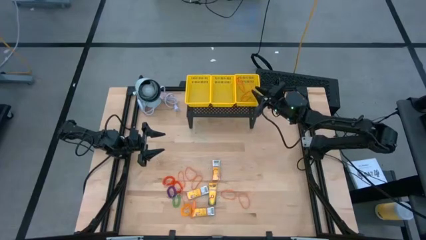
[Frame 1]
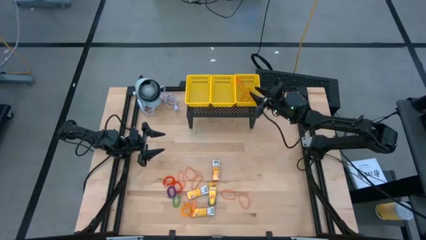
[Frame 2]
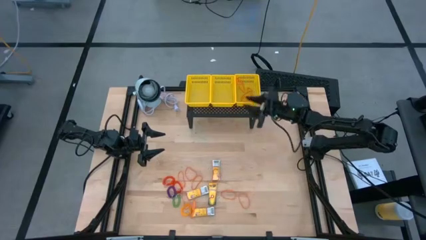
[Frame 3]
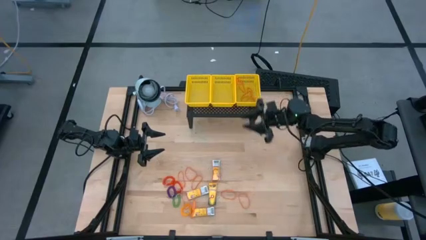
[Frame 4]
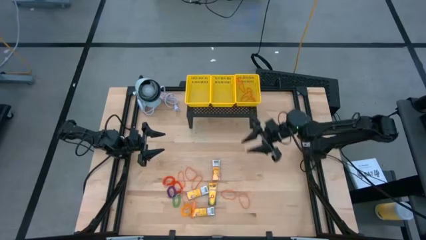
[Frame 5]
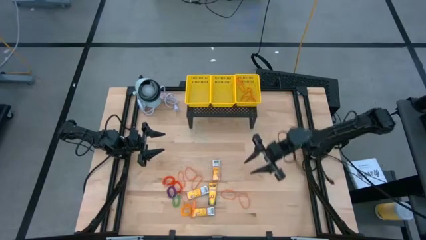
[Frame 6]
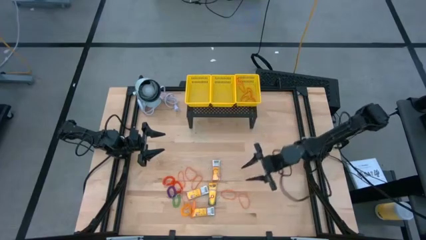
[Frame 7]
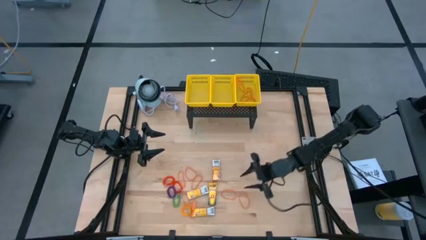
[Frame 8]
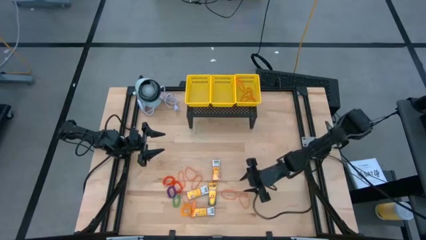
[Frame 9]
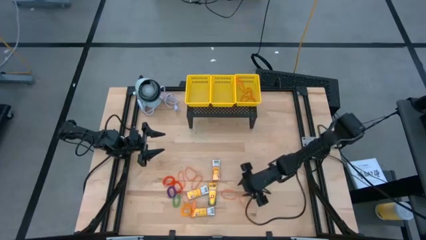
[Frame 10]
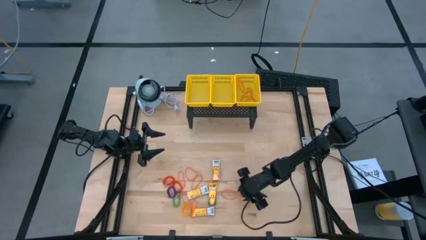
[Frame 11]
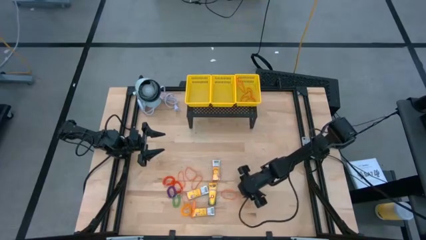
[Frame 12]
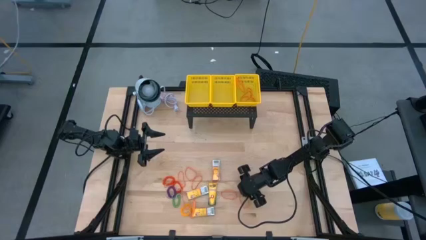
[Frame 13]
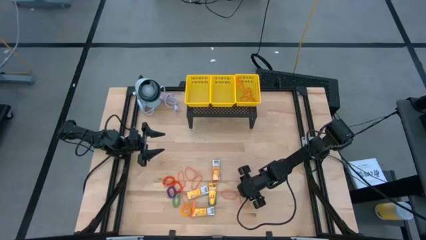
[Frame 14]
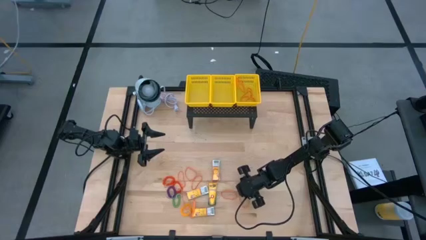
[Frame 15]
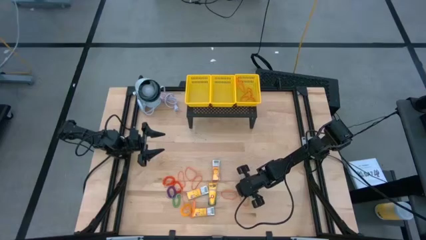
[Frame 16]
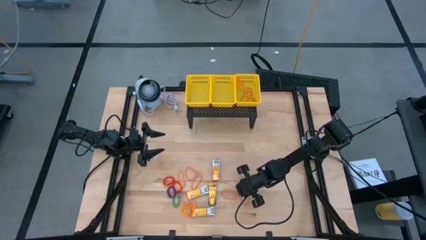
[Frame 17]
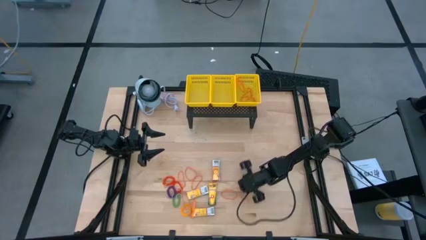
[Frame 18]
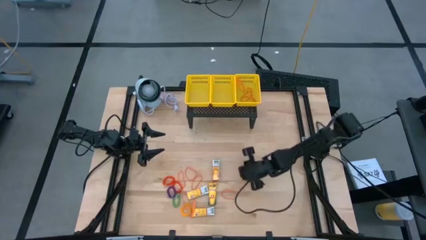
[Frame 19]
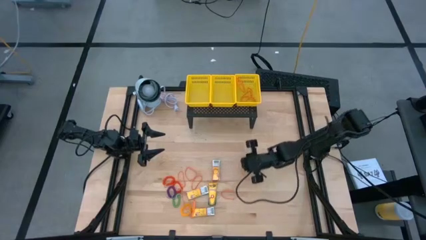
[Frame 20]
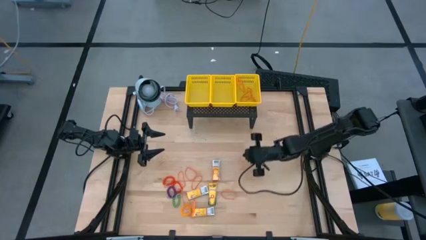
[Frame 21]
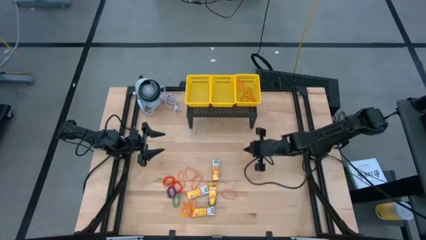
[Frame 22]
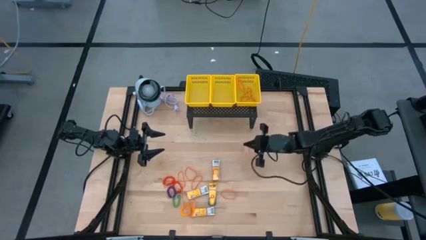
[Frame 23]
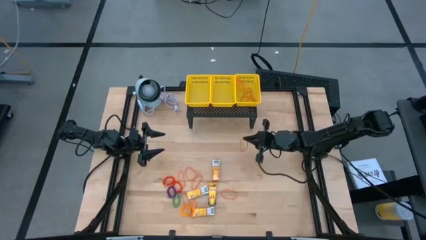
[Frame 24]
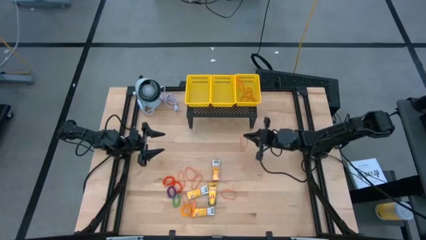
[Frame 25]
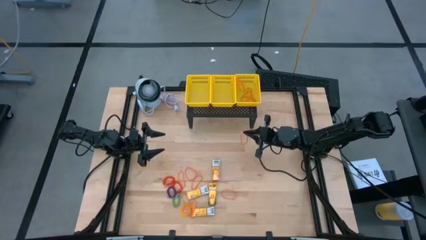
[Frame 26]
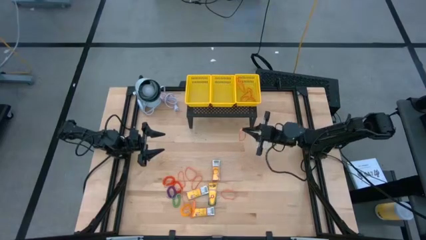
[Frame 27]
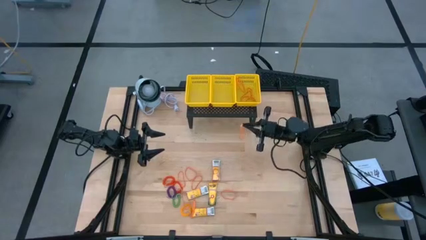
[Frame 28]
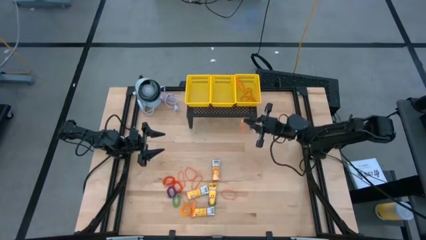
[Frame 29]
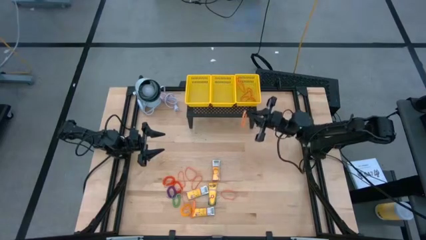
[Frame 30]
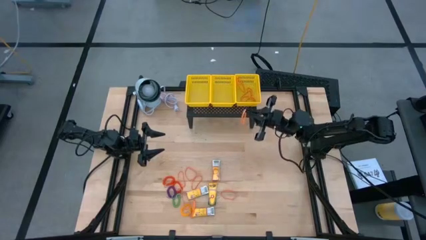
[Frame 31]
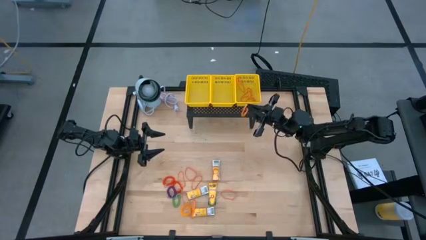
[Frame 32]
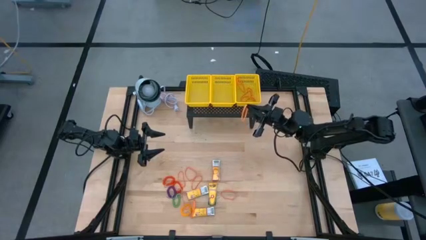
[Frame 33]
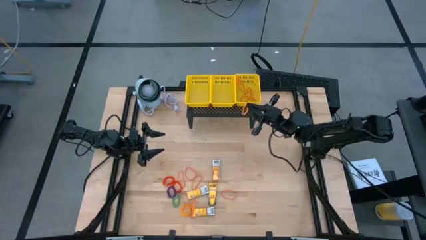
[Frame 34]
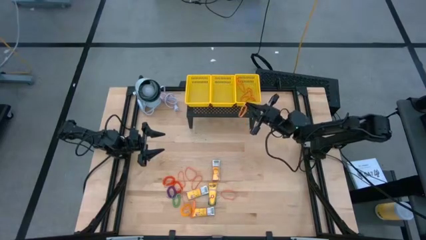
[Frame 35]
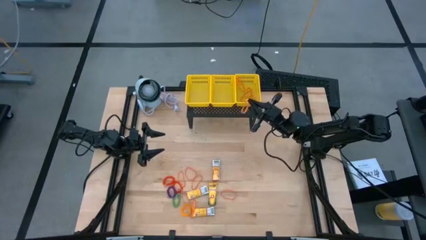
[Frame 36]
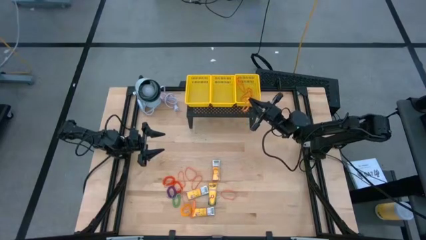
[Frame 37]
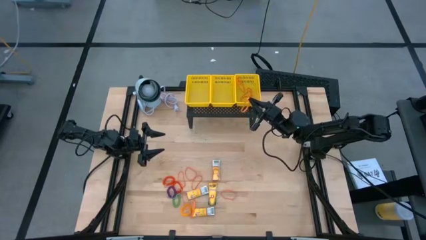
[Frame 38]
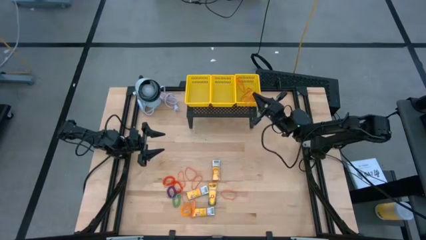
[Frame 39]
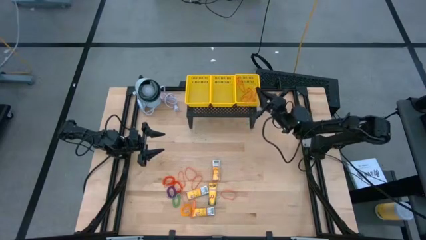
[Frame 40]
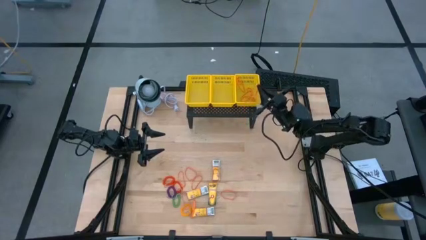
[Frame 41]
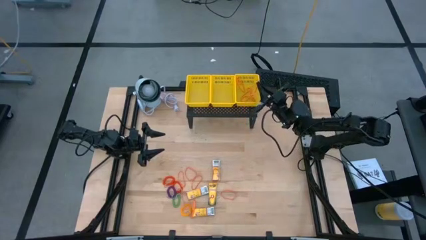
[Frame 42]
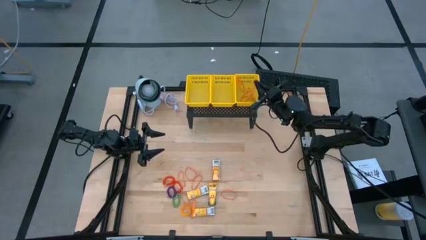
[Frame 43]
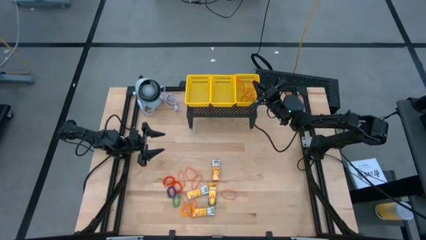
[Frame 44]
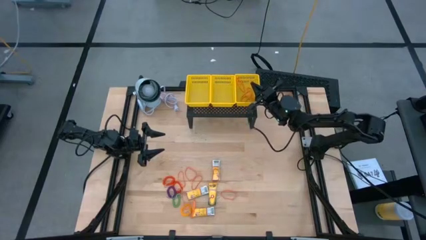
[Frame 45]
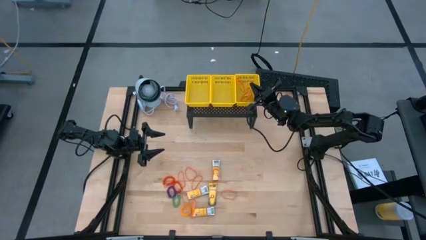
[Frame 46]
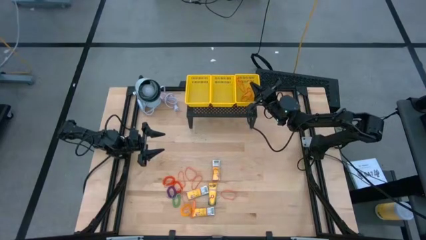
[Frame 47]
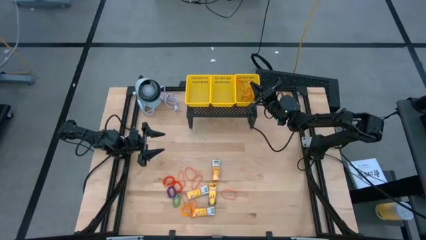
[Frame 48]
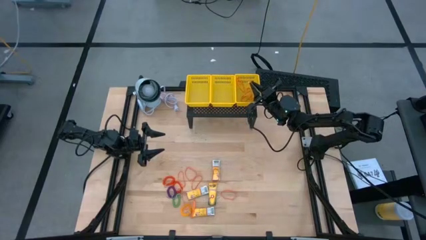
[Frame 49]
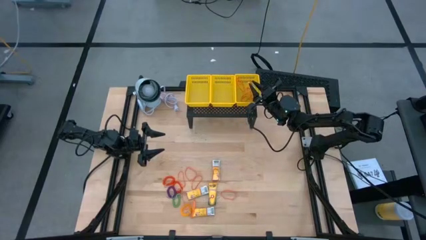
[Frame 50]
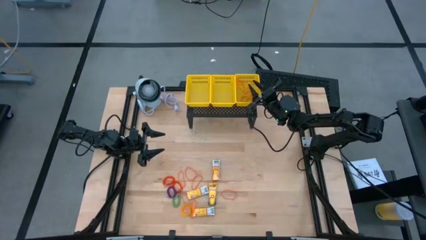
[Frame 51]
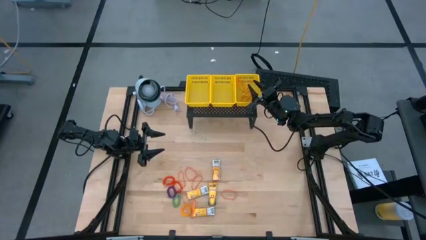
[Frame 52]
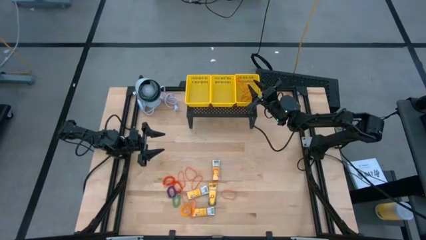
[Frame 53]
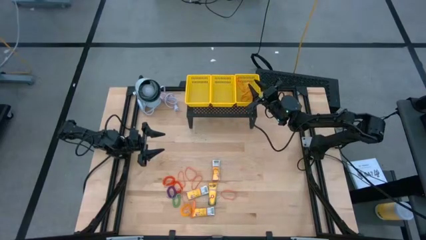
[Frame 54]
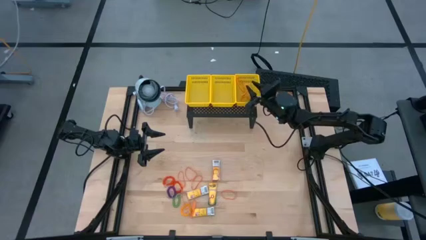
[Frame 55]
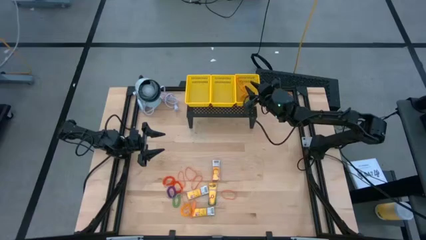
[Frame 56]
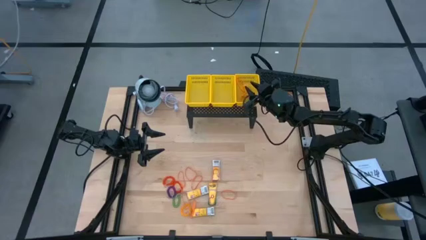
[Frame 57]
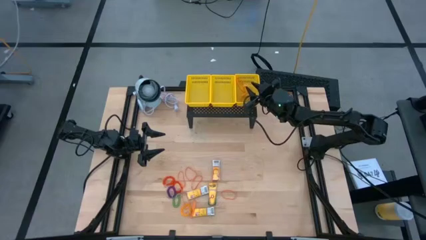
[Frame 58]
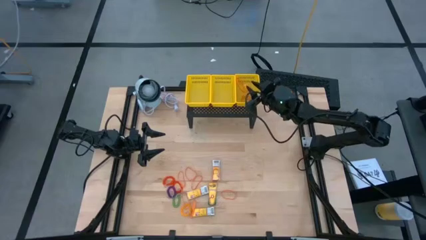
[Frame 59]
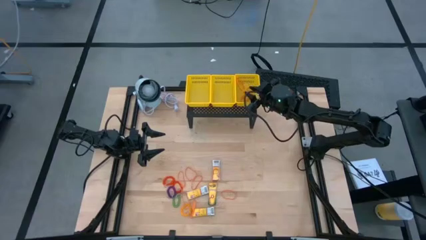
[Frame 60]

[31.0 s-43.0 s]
Task: Pick & Place Office Desk Supplies
Put the orange rubber band into the right yellow bin on the shelf

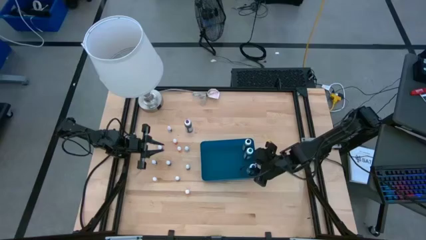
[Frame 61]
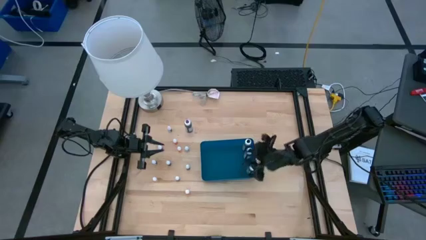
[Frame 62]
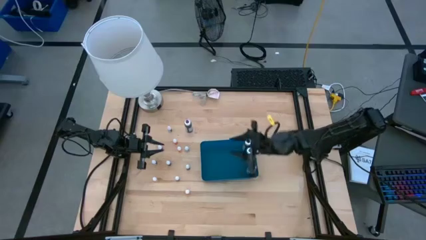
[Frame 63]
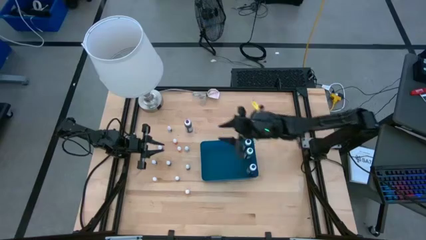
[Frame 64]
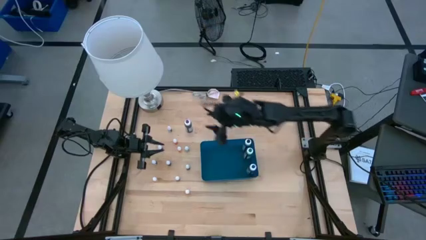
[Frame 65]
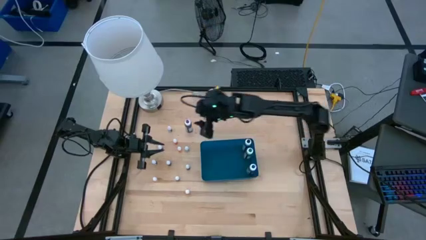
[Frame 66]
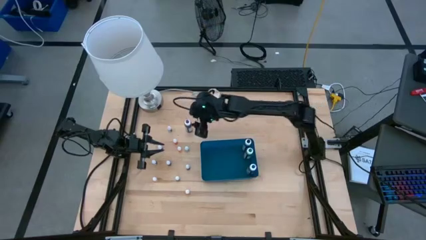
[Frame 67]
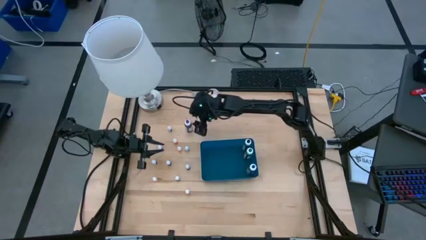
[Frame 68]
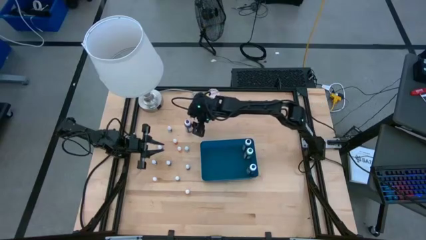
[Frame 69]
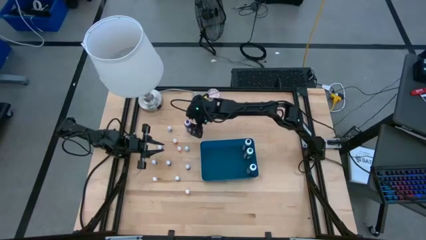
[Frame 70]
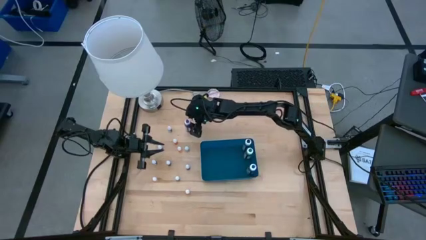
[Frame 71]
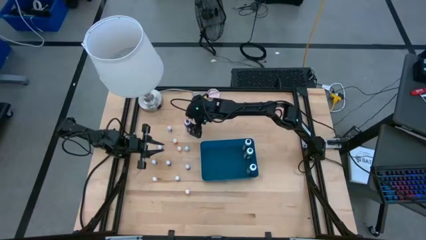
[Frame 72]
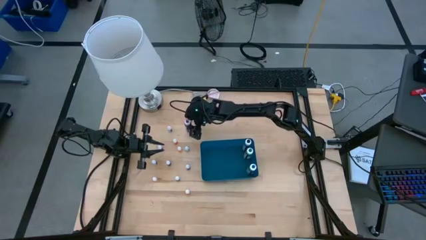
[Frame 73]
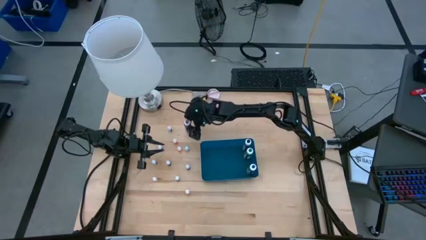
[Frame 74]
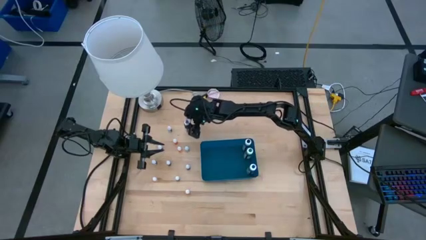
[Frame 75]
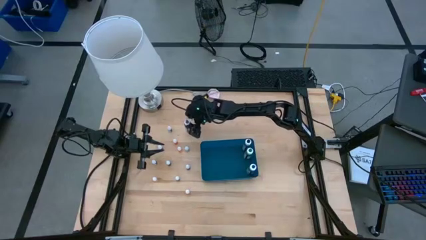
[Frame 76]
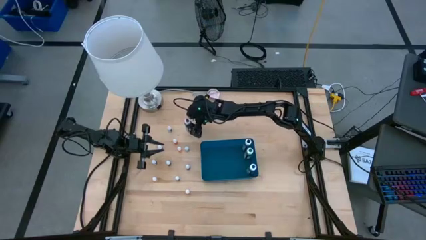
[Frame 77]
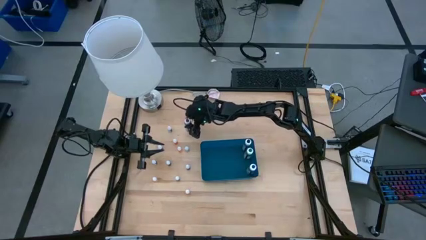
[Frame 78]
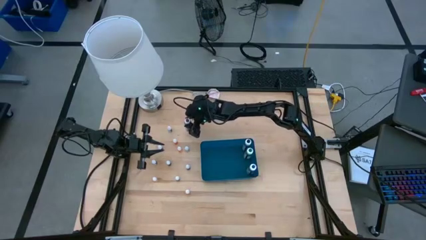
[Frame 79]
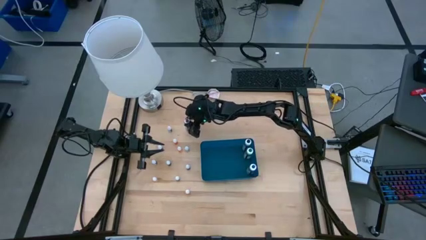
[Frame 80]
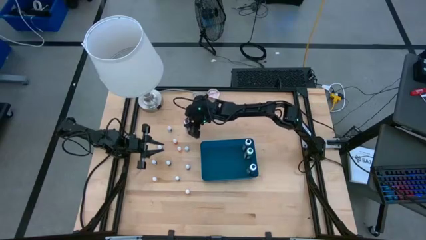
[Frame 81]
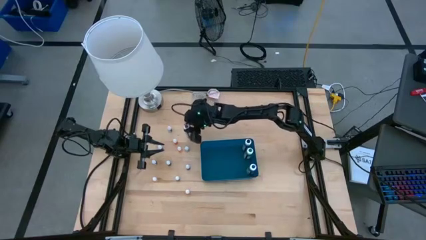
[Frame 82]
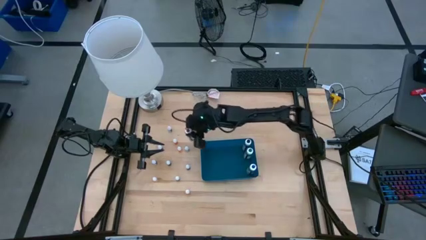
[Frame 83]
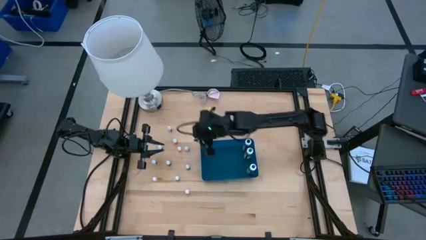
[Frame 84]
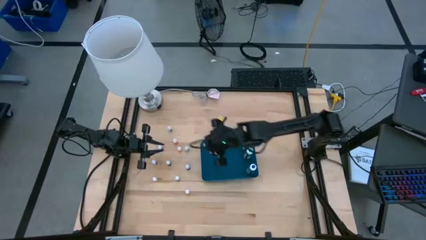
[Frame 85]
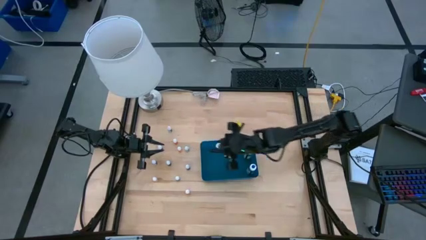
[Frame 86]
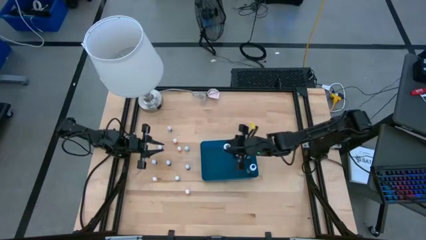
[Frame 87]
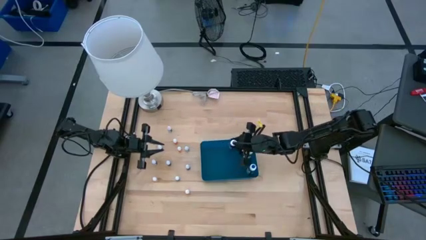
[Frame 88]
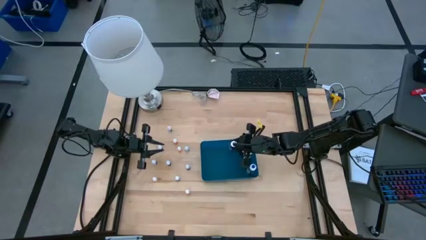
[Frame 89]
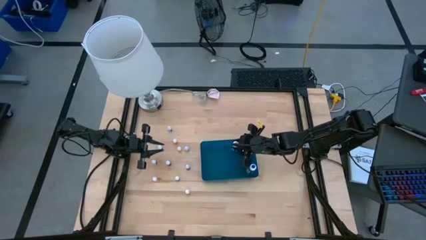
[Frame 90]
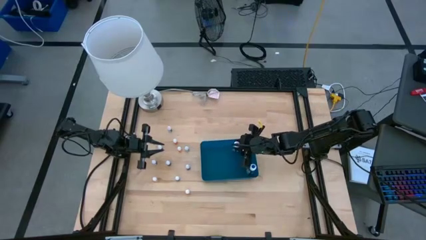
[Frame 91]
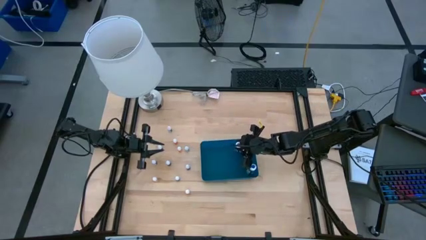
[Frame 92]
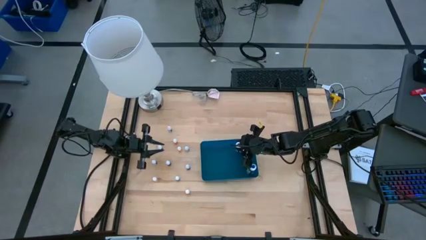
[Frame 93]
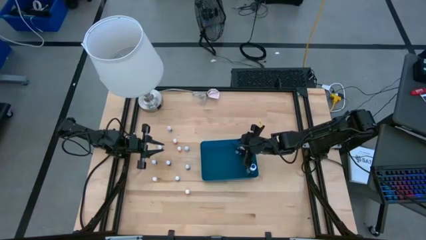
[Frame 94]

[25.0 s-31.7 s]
Task: Pick & Place food coloring
Put the large purple food coloring bottle into the blue bin
